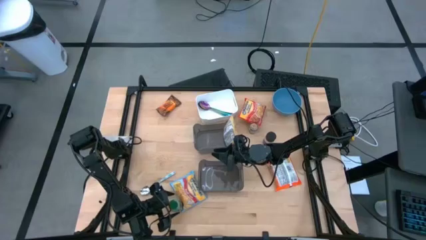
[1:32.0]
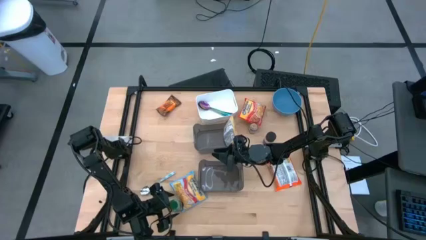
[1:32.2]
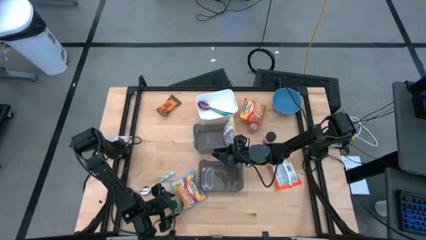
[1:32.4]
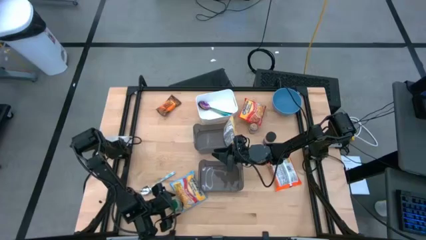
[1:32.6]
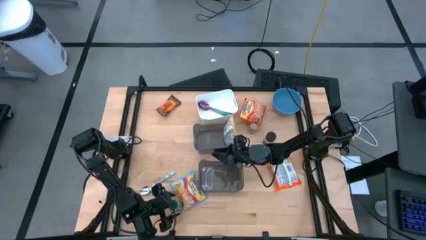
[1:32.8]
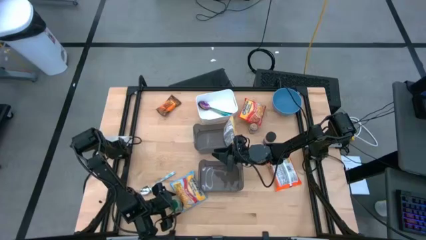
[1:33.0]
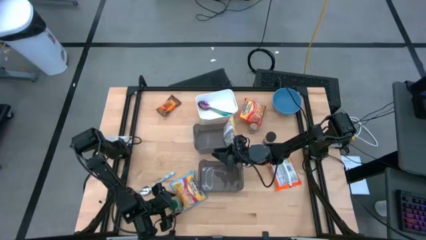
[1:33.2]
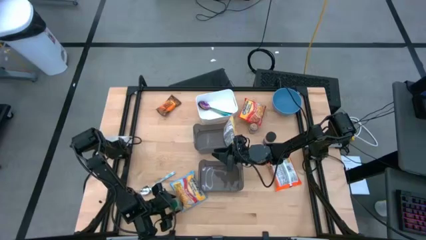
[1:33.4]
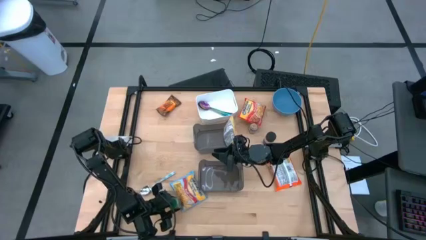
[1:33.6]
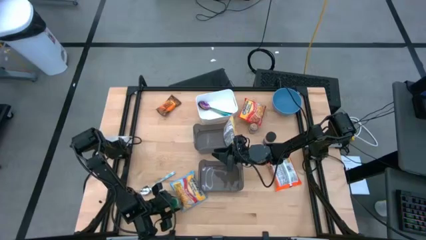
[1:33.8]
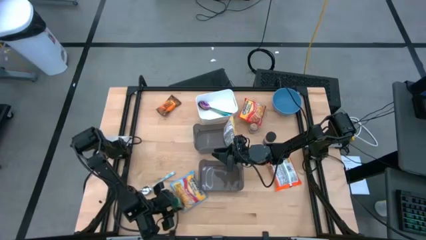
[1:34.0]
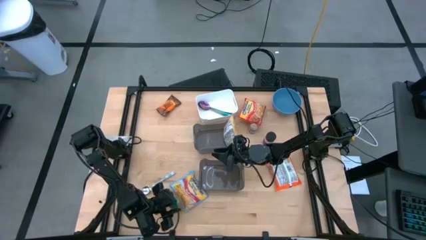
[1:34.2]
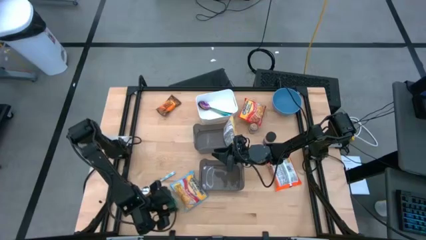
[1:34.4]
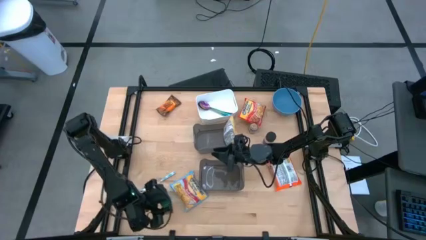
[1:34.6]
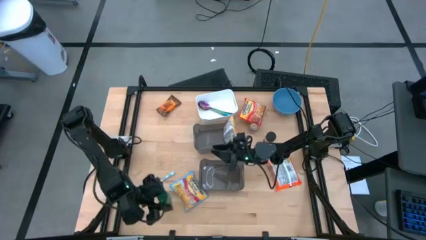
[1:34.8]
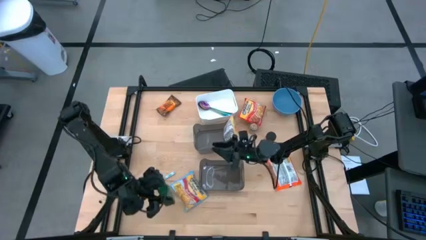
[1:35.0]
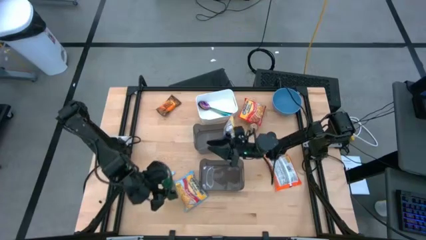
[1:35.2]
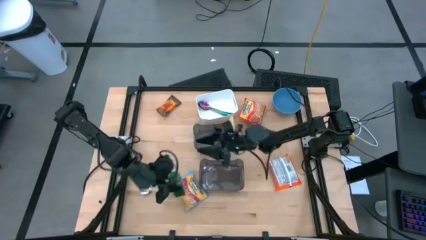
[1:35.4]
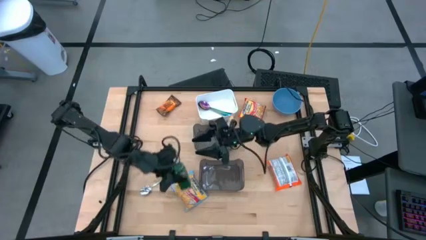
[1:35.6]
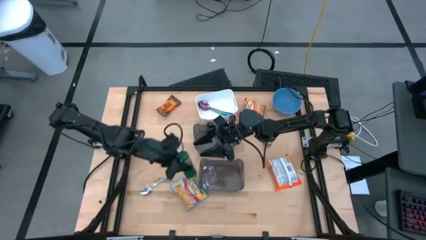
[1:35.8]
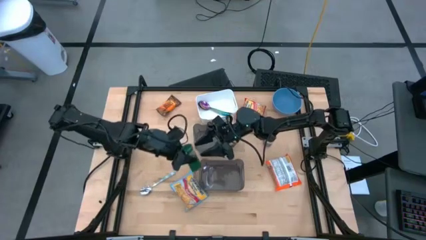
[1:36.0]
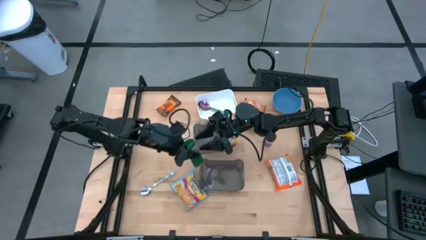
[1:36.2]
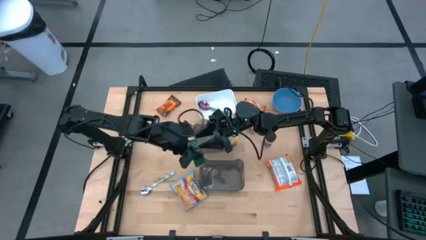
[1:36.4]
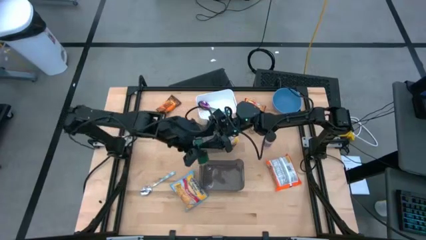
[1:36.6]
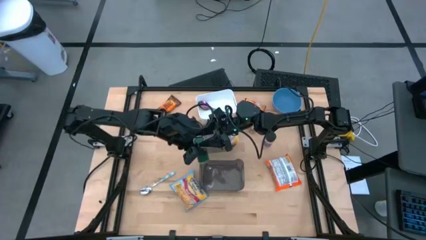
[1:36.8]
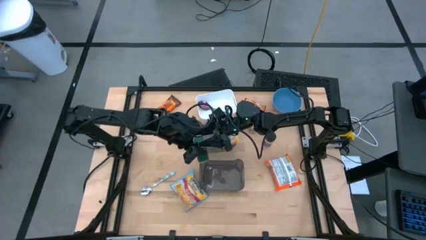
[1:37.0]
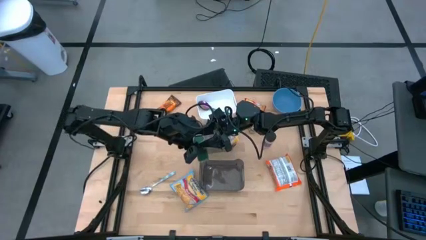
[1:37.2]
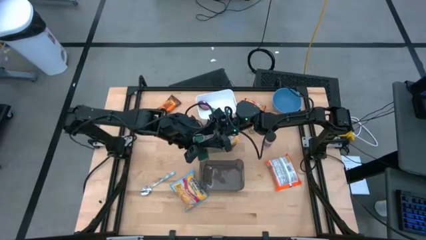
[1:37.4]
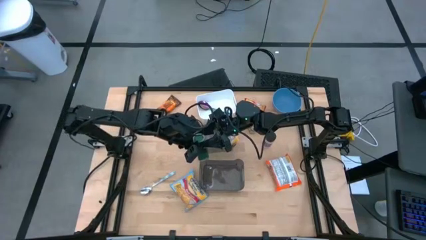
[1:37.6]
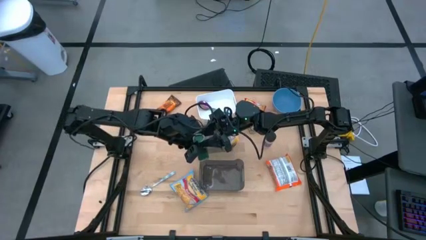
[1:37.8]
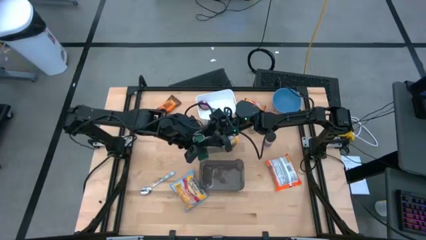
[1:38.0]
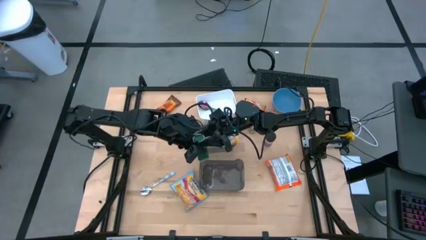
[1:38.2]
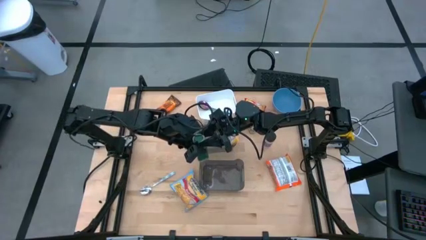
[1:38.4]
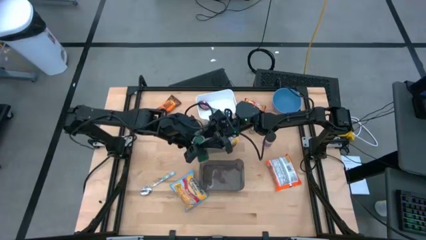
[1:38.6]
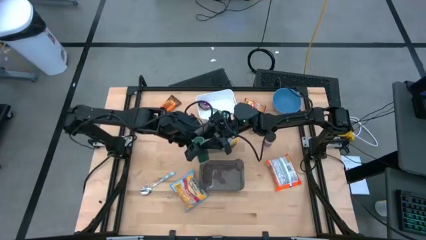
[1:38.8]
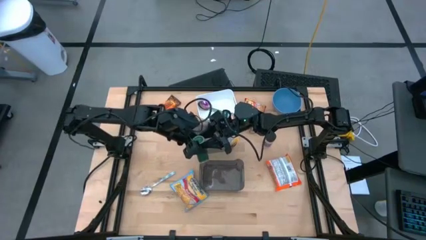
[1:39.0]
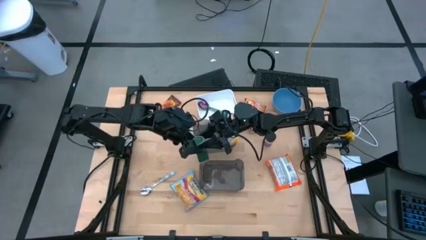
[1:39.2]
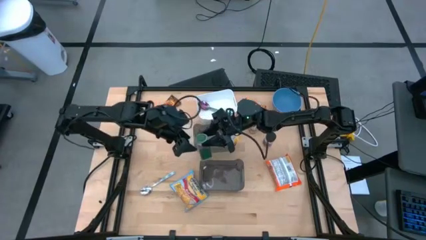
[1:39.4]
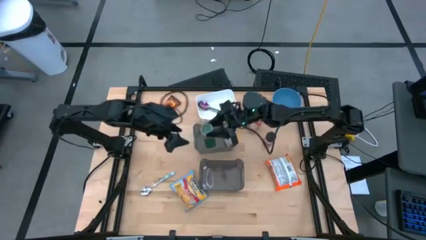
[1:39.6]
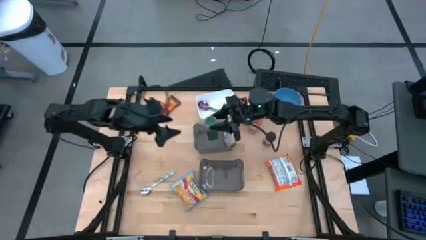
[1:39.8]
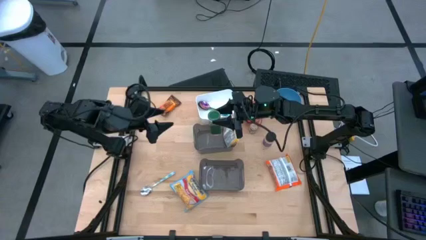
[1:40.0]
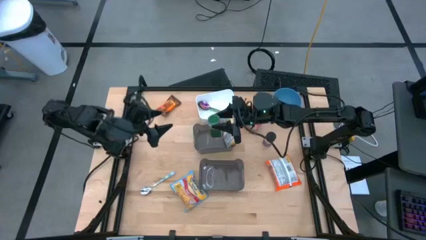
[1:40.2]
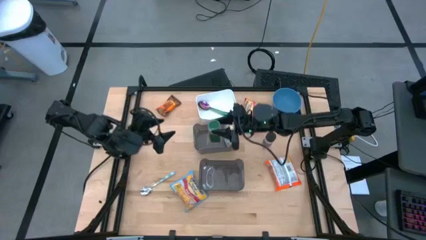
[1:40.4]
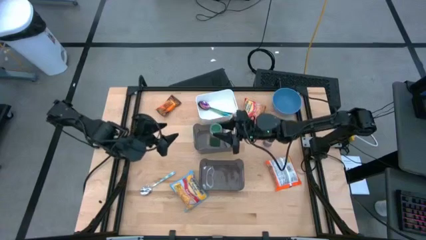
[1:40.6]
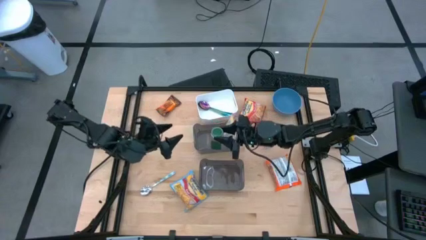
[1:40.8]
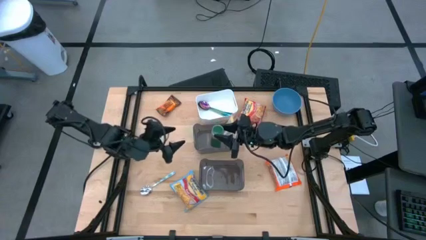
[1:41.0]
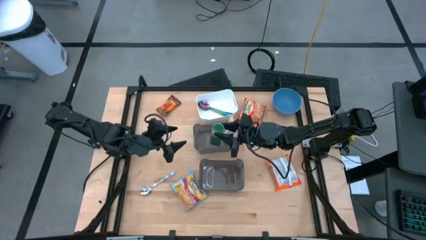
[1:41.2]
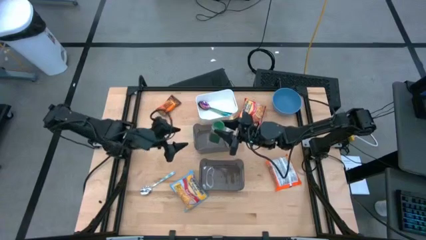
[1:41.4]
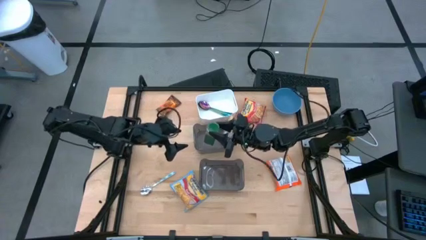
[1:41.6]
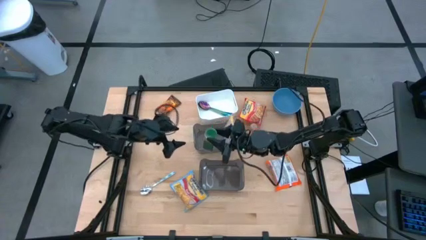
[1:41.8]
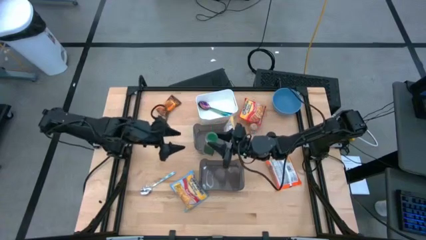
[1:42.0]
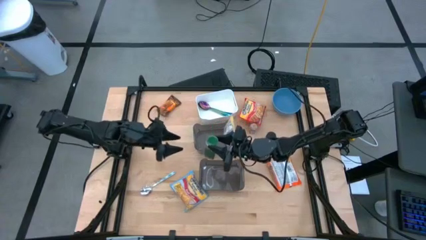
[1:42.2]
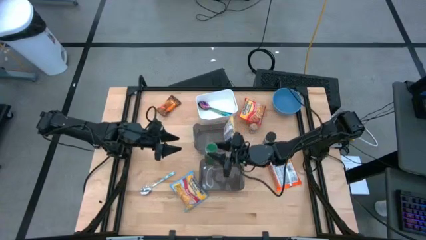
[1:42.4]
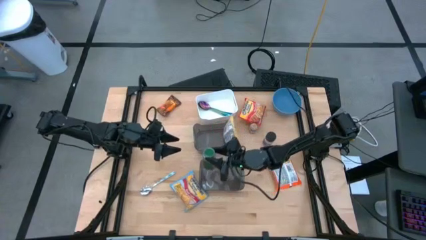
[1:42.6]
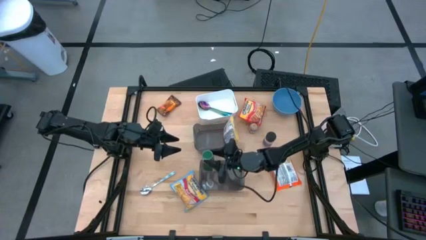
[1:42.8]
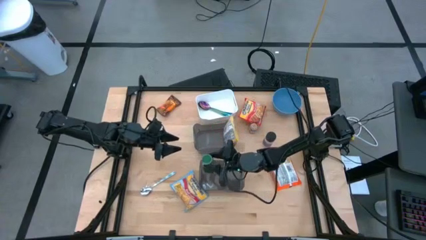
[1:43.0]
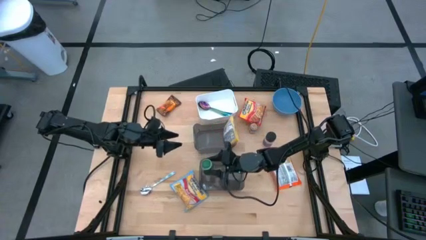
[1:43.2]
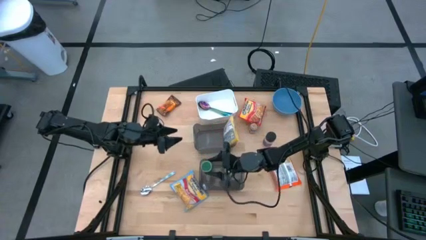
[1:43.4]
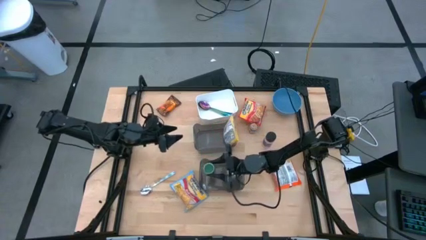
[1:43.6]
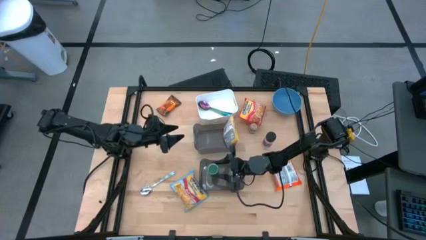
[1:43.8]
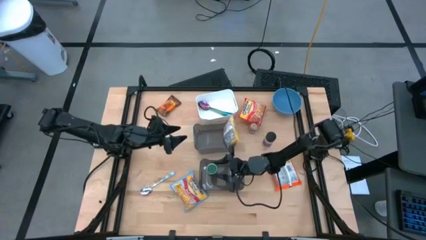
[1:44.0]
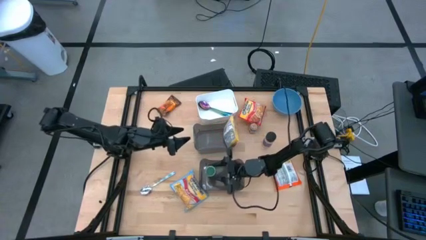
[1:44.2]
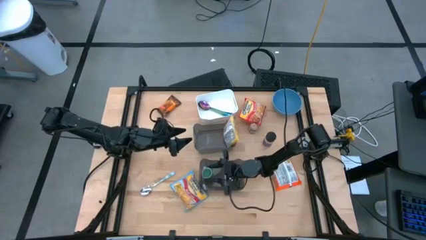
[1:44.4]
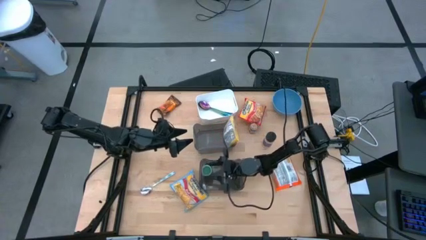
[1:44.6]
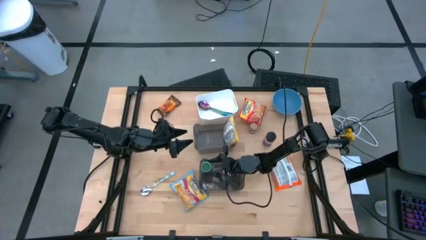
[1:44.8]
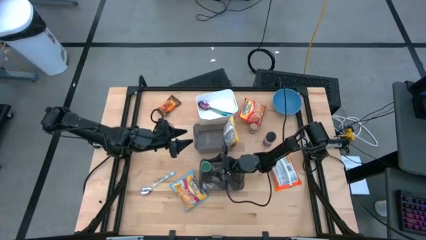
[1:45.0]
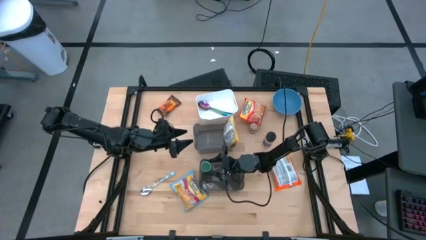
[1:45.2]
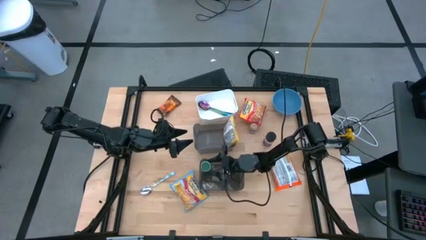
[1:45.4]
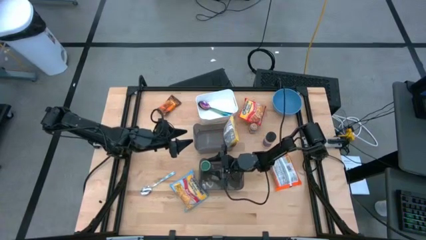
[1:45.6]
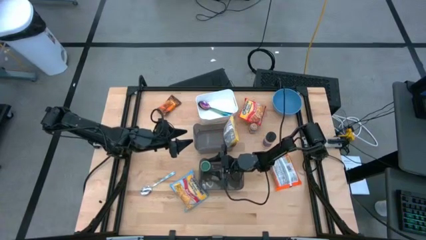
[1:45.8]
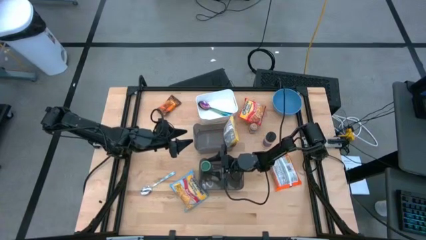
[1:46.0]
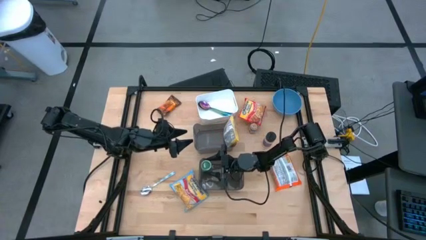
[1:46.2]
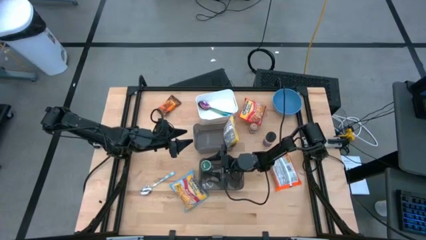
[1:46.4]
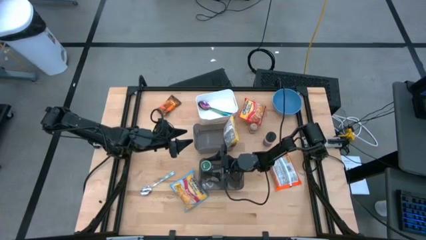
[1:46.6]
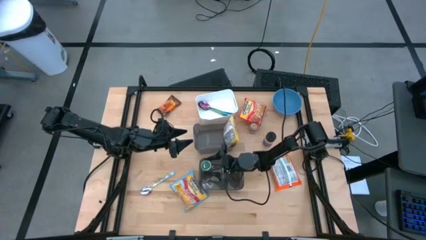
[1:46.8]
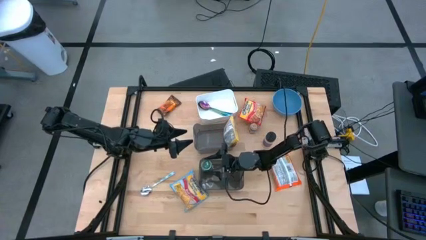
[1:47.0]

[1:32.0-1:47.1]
Task: Pick & Place Food Item
Put the green seasoning bottle into the bottom black bin
